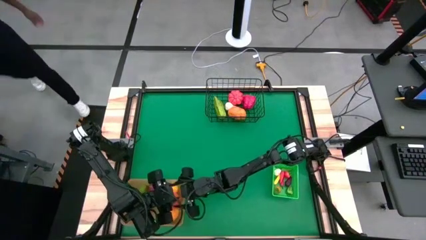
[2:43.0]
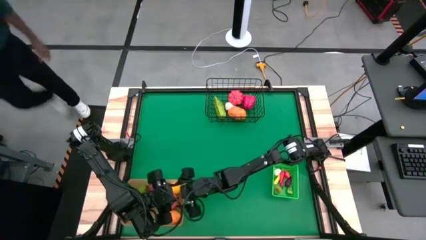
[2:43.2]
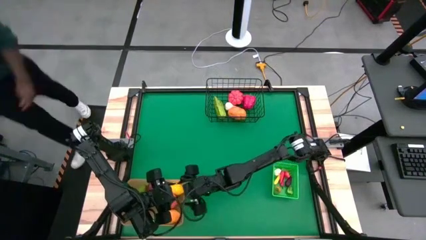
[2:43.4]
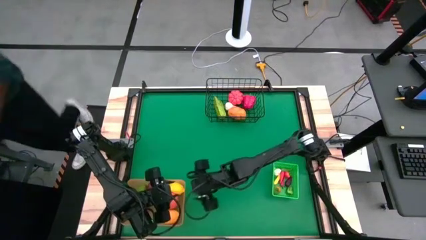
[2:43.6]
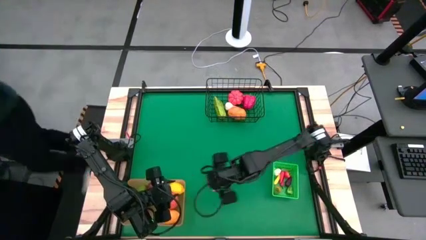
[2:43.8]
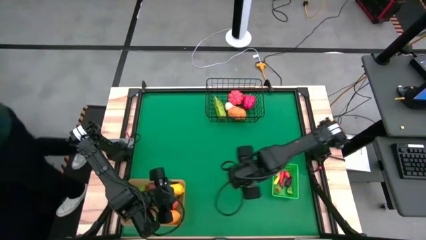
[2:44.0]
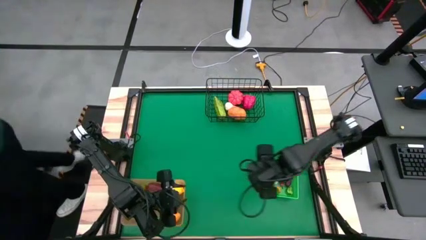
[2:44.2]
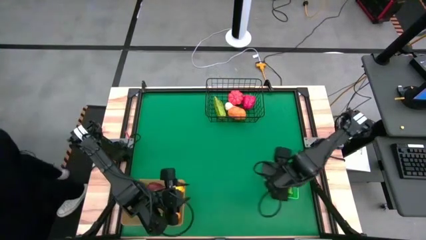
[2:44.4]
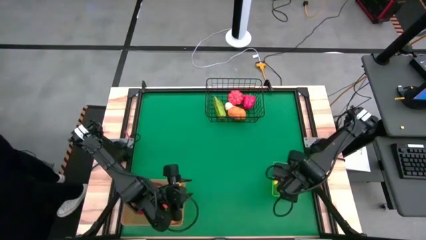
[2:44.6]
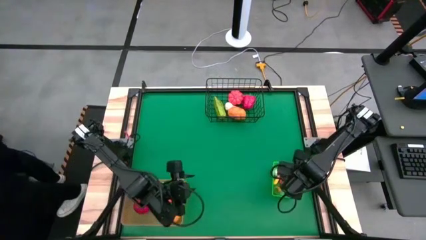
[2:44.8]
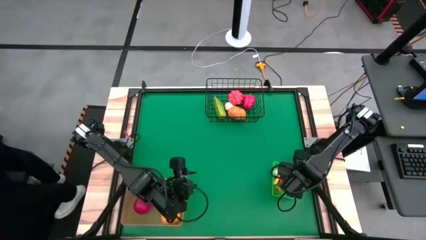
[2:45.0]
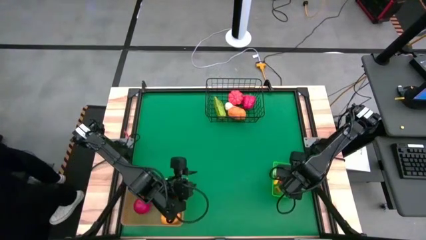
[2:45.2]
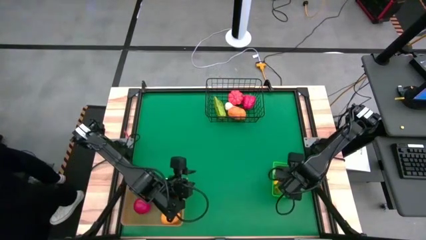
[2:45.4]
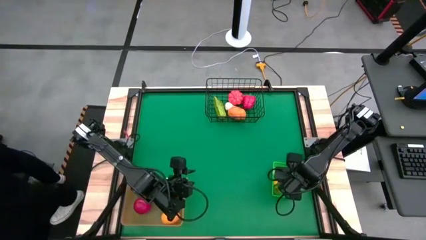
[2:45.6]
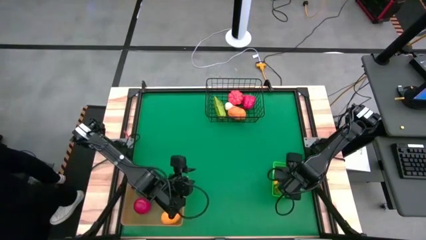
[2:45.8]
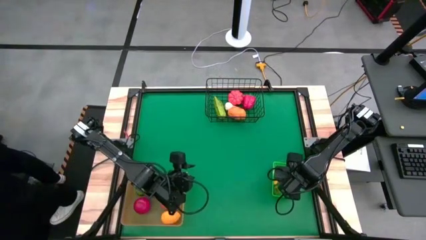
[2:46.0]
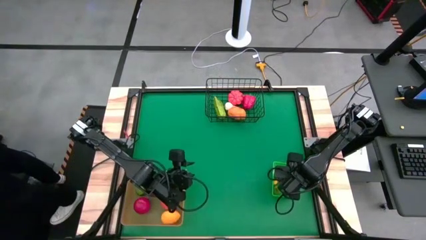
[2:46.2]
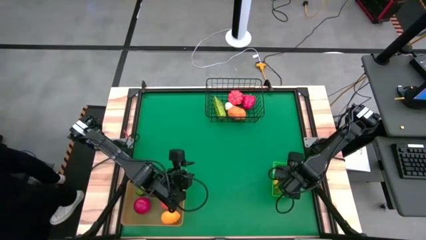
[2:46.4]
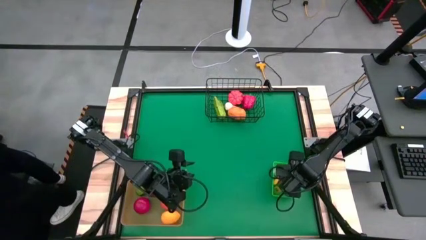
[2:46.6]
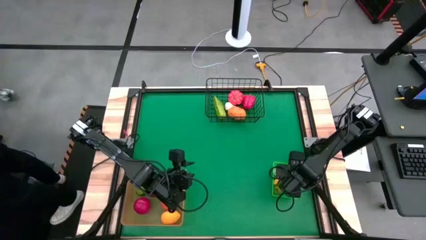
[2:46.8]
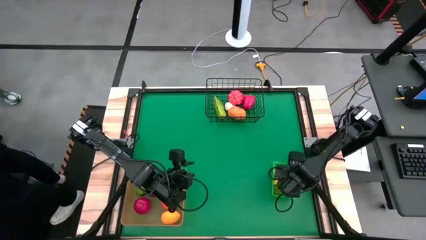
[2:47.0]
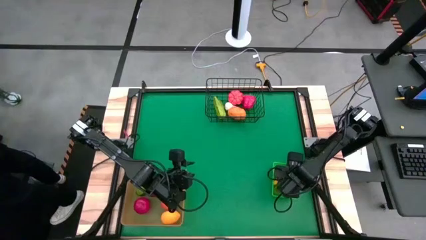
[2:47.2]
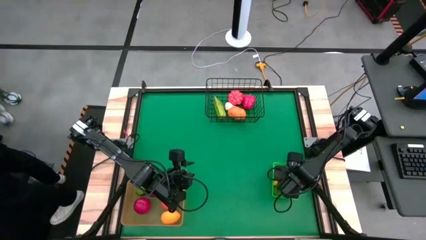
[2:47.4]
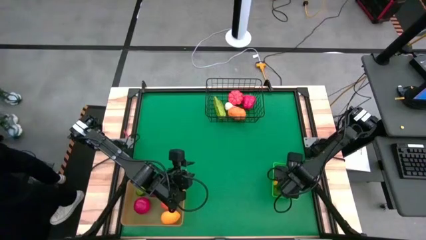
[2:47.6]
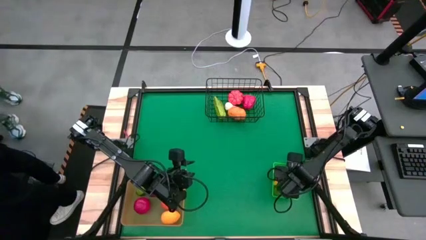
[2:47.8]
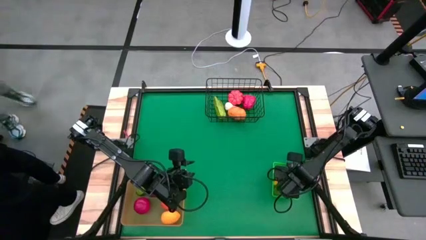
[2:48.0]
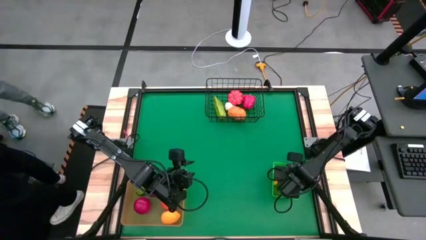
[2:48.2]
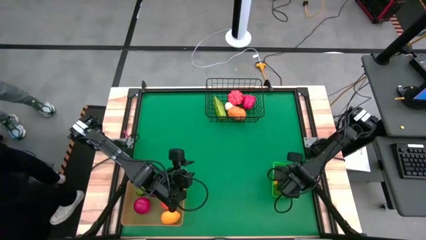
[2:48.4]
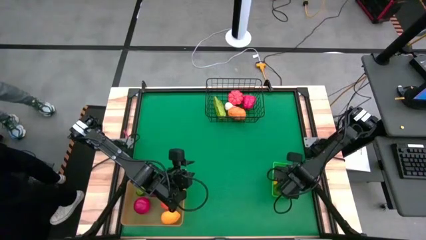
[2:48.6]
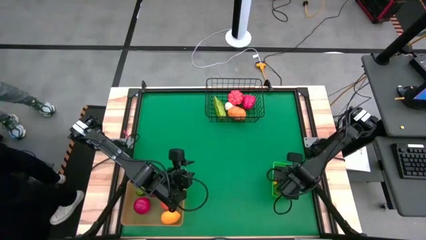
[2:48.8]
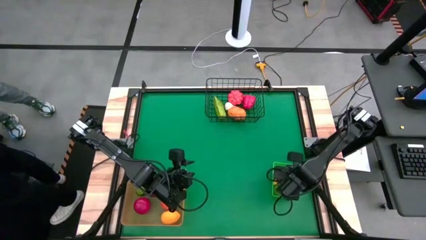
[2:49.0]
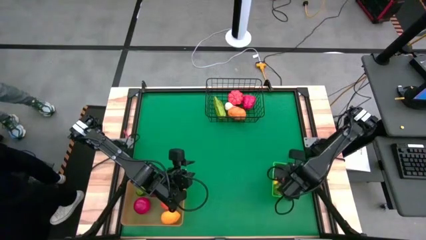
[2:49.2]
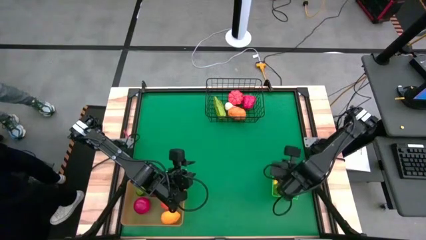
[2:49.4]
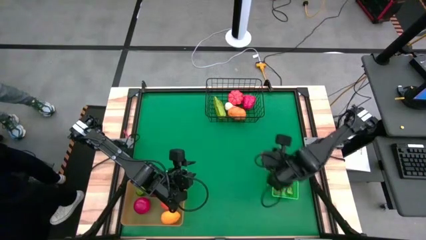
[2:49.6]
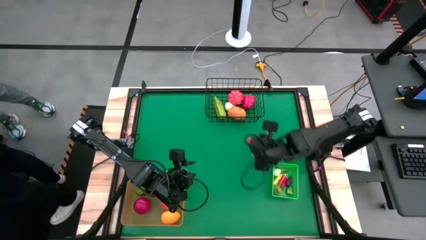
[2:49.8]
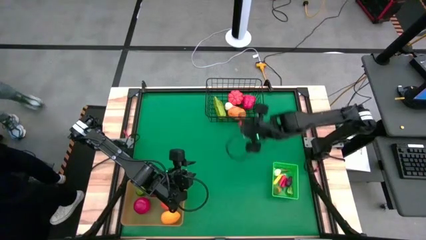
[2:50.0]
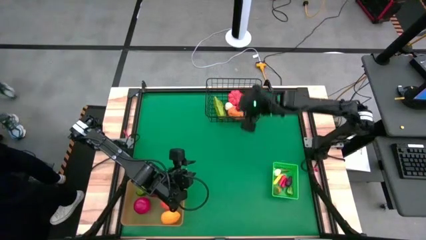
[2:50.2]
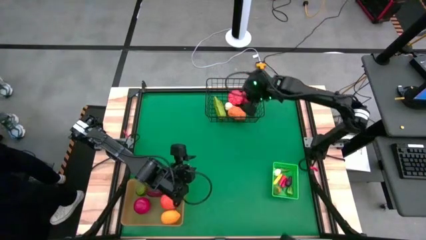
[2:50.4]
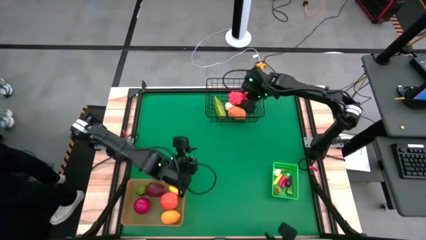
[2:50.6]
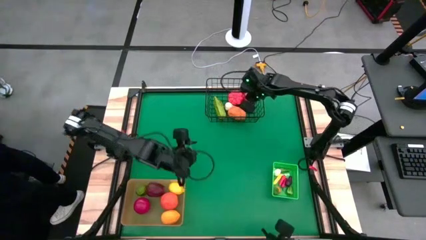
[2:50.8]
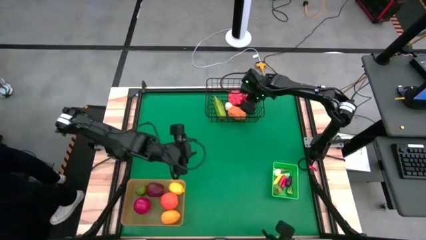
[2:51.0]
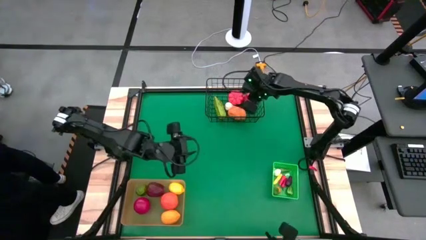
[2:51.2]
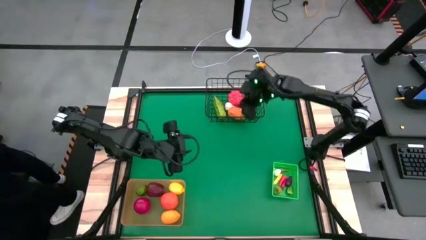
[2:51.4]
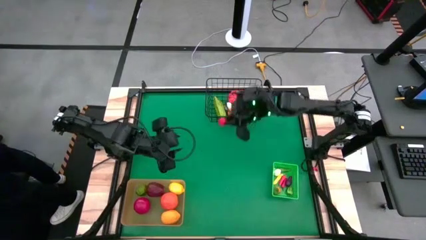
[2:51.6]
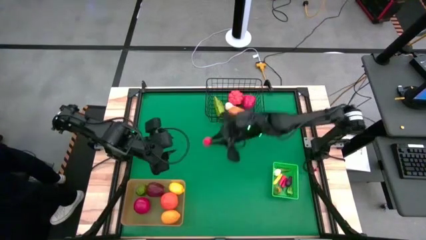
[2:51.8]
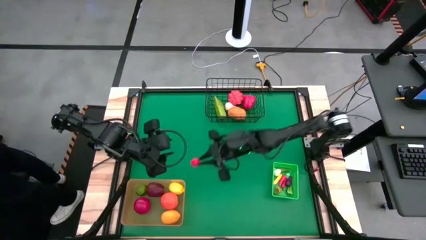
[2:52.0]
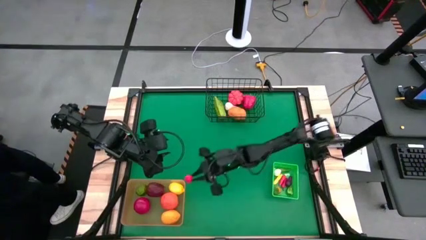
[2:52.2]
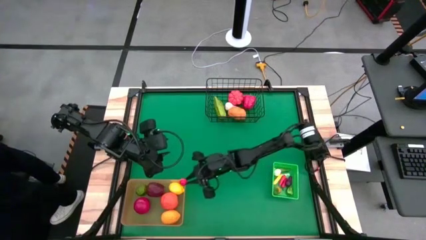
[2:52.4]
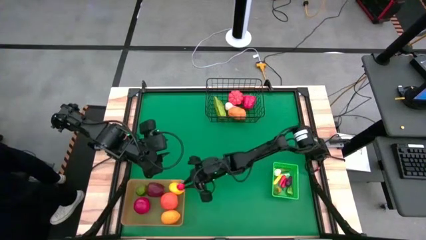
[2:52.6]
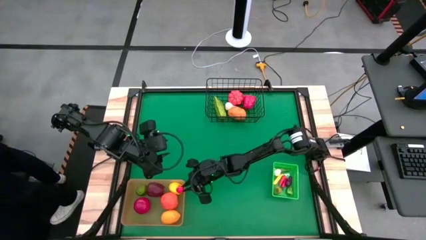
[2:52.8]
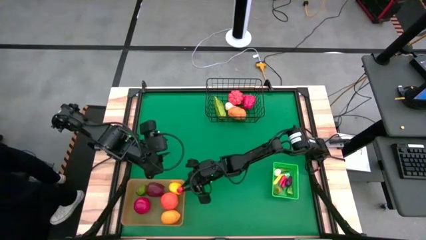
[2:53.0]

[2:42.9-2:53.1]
Task: Sort produce into baskets
Move the strawberry into the orange bin

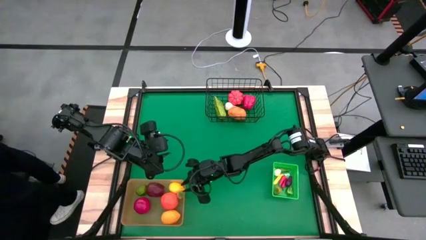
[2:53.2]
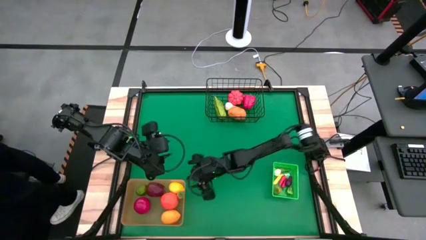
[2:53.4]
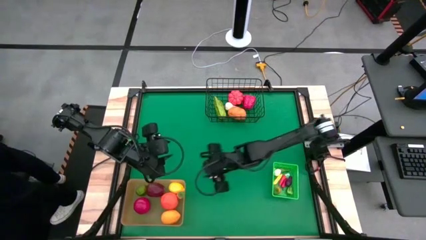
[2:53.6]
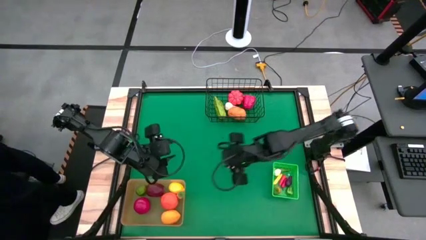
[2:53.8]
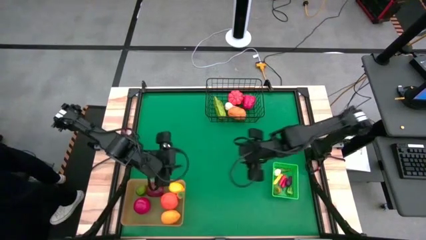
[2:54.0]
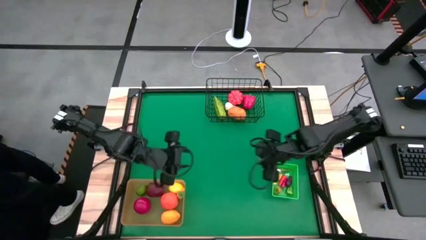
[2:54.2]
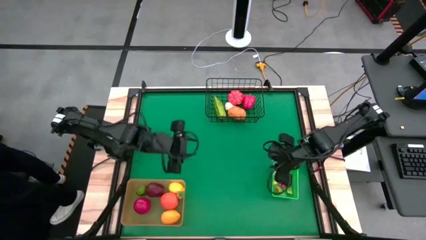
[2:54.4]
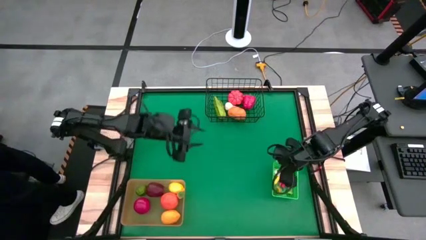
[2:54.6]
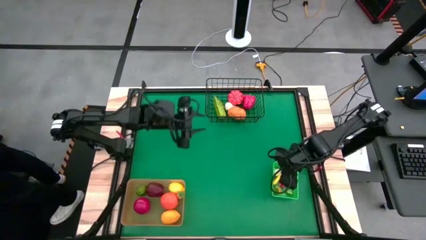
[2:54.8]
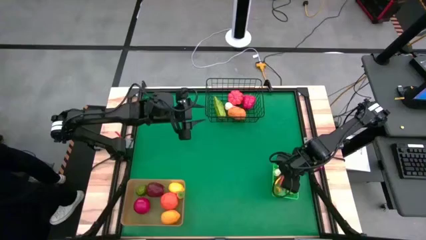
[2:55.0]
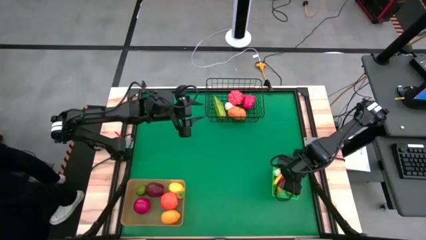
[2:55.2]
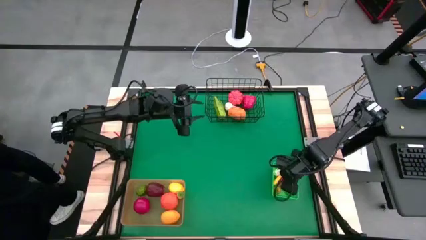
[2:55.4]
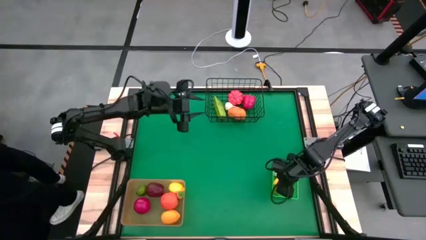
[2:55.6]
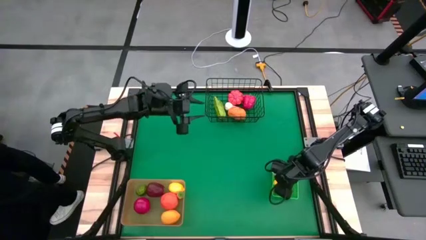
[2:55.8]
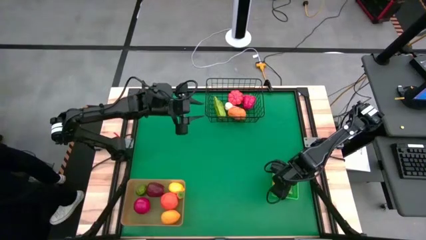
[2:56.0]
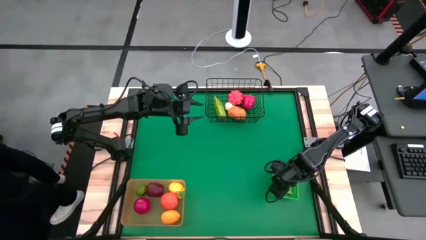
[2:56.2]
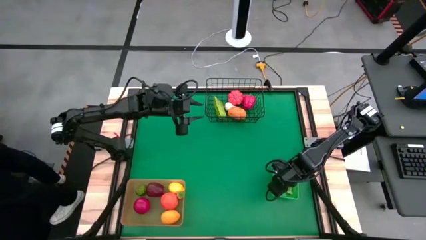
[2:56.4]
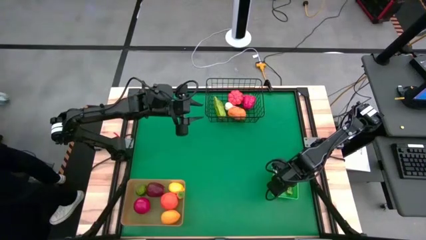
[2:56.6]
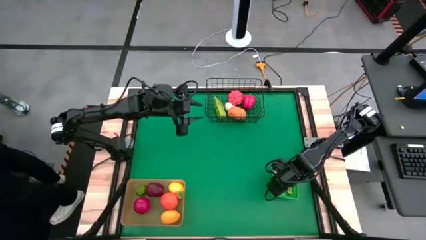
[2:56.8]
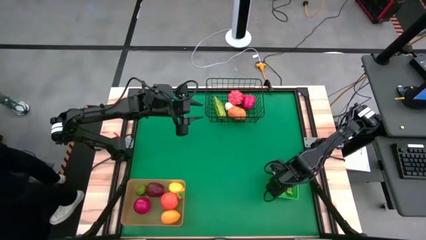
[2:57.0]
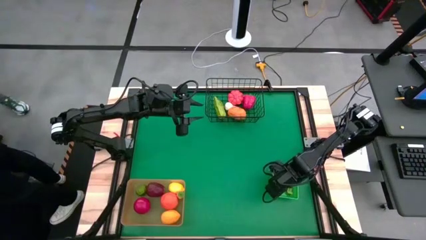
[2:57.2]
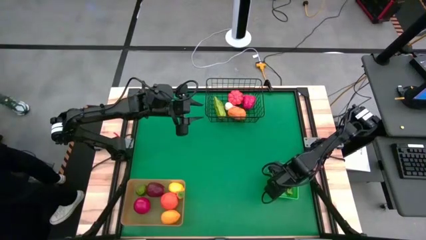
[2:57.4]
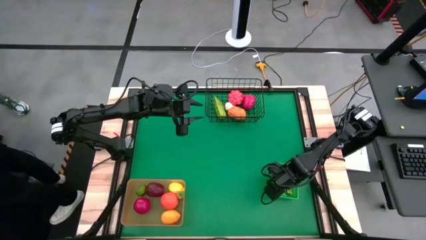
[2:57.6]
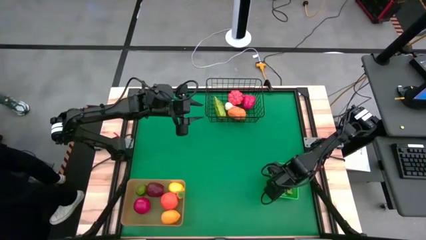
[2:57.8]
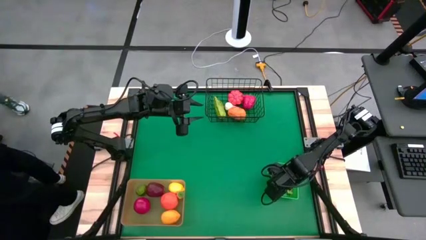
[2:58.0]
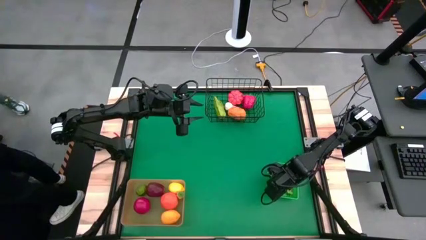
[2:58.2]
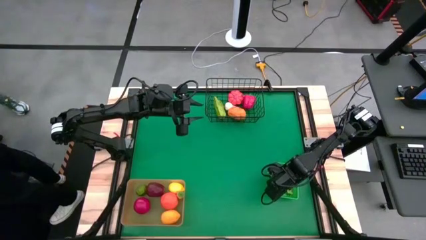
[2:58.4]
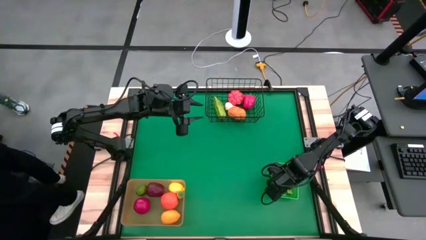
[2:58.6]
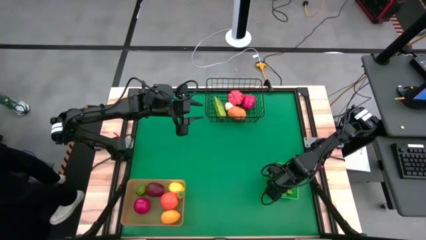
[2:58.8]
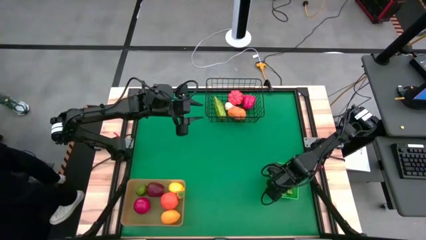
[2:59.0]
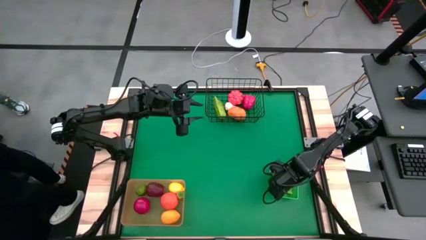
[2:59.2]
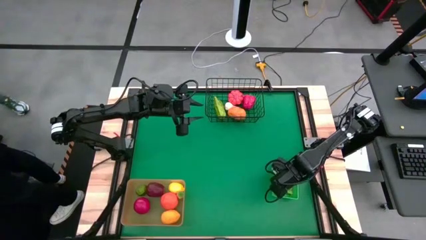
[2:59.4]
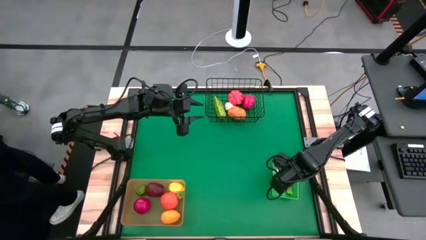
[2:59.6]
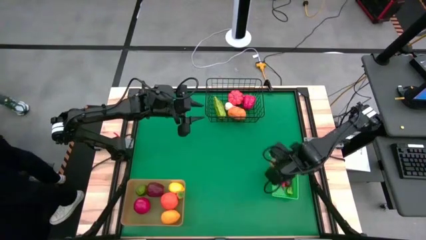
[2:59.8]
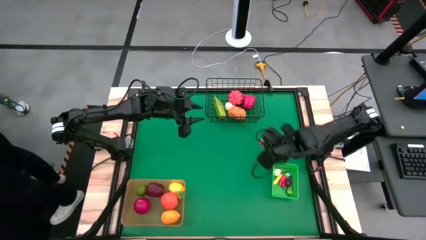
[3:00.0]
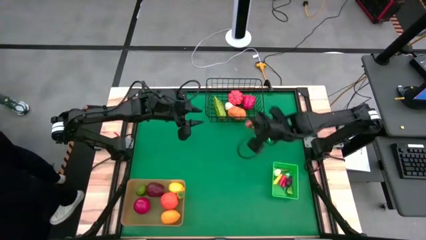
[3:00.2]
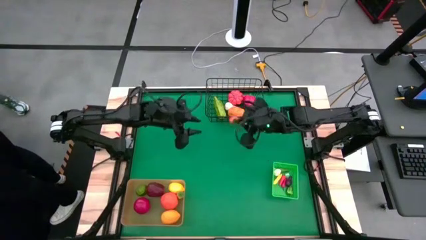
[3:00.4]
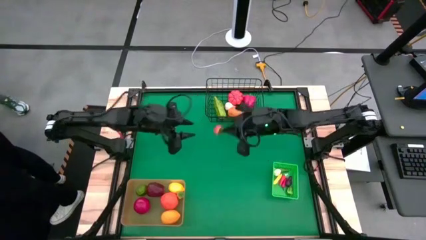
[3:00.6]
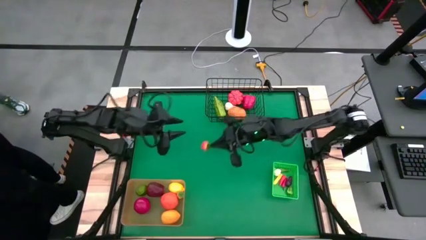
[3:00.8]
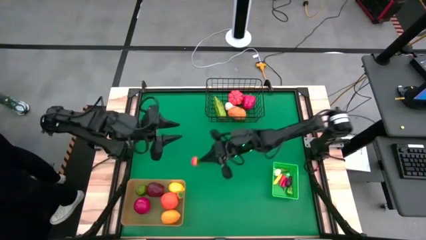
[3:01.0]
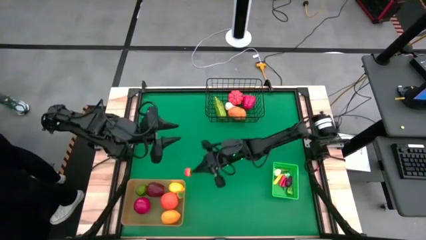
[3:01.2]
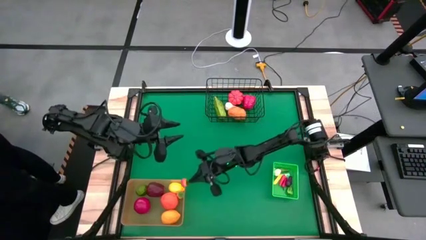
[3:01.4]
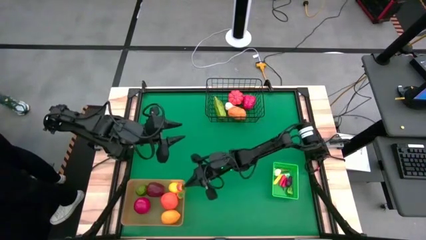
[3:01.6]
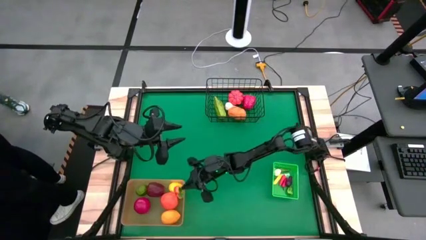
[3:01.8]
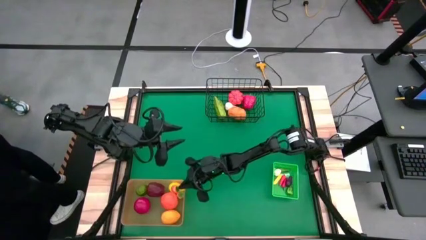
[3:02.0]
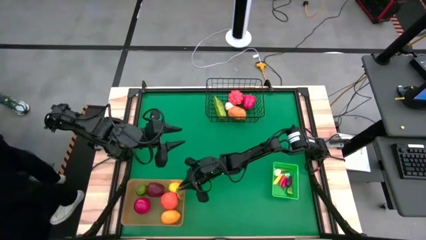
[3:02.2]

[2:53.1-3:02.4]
Move the strawberry into the orange bin
